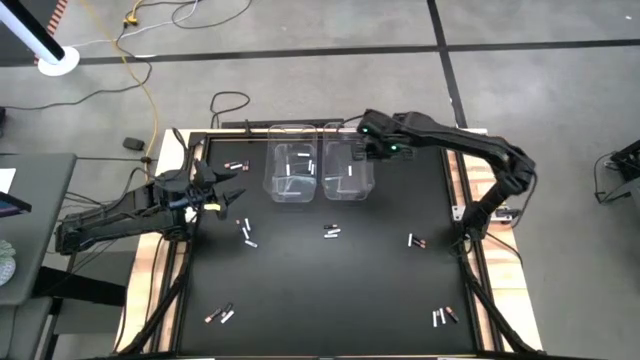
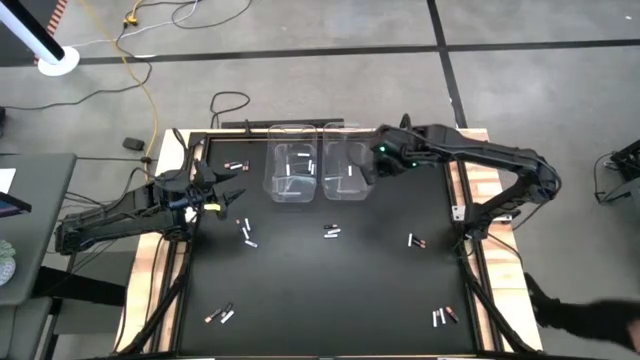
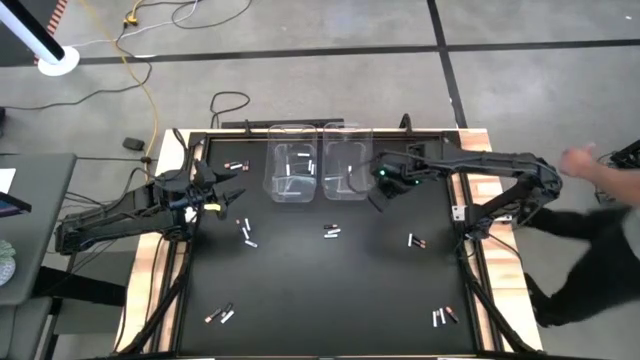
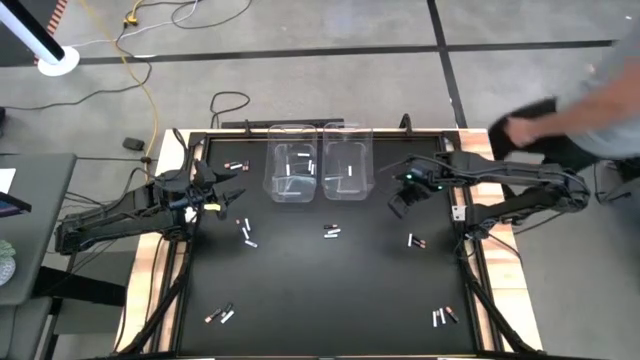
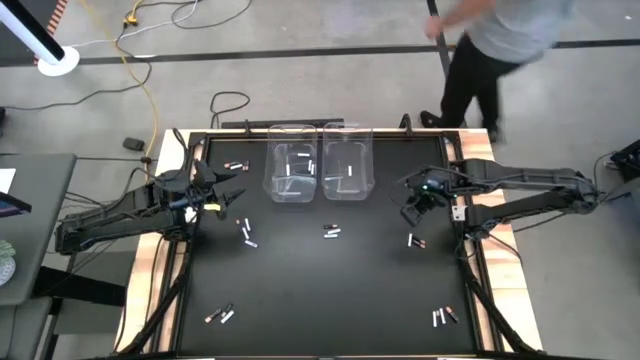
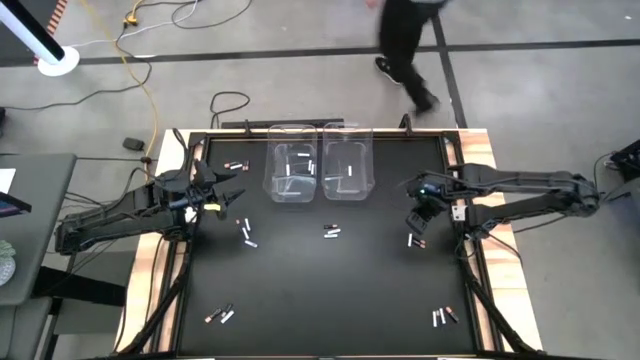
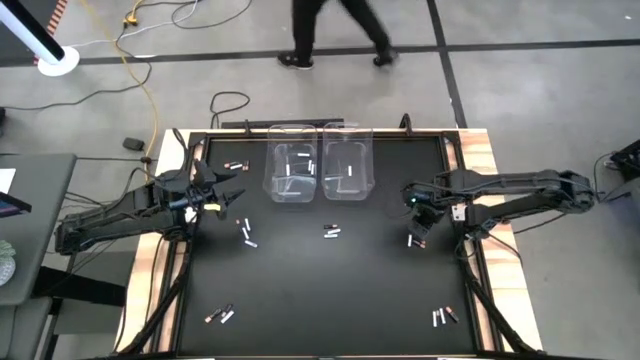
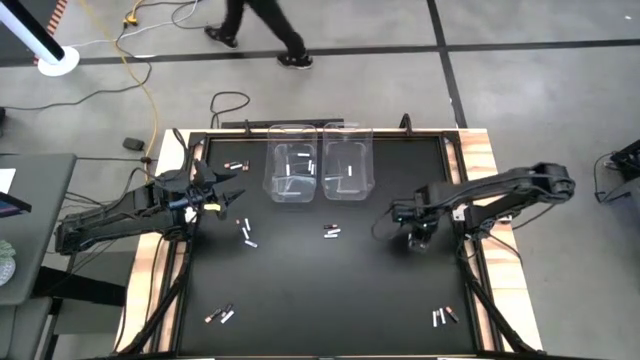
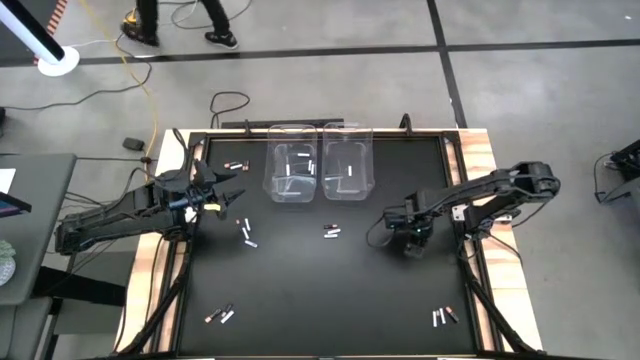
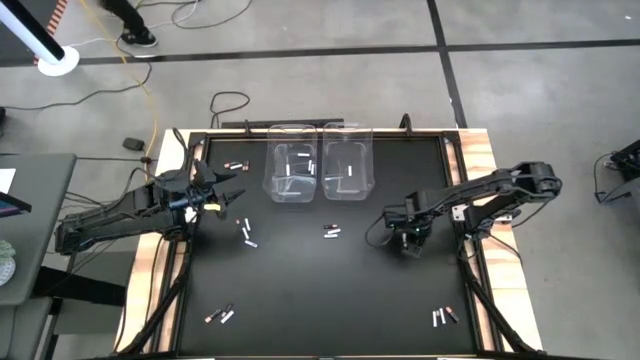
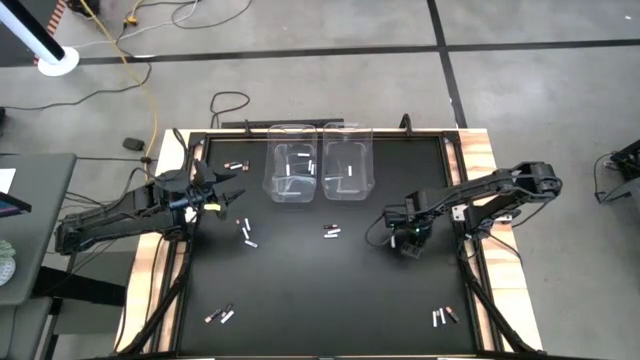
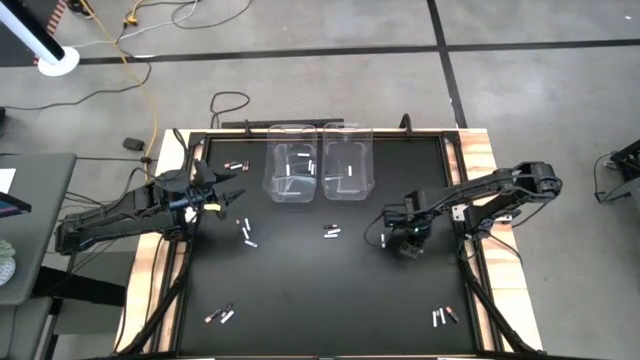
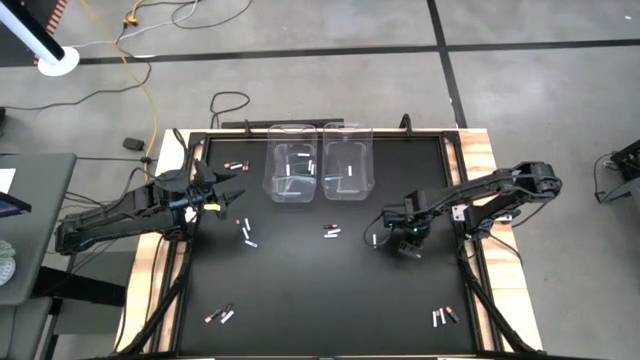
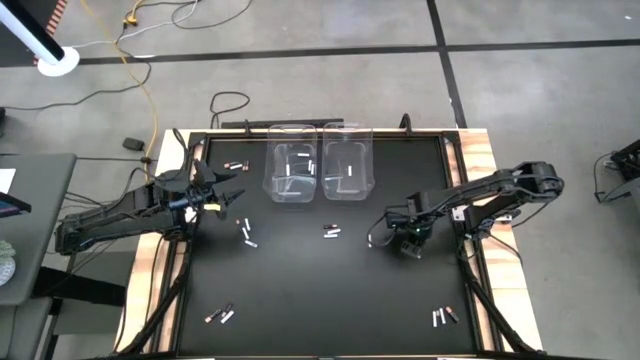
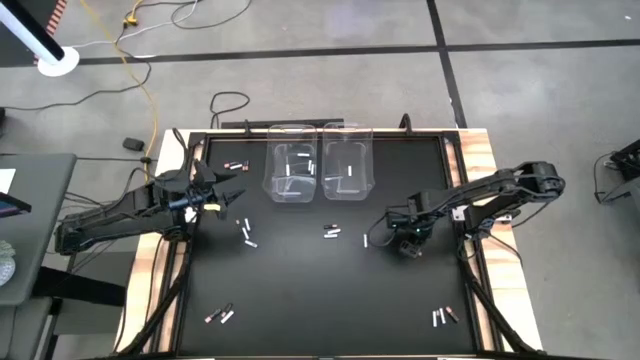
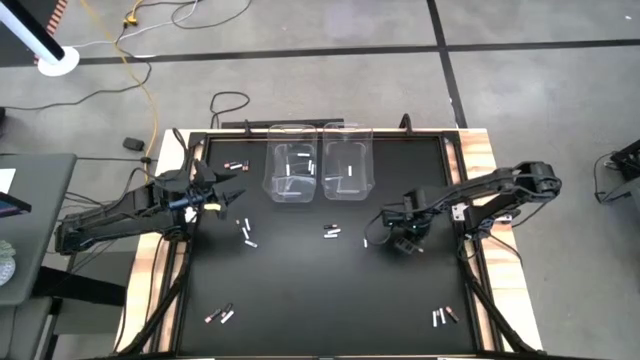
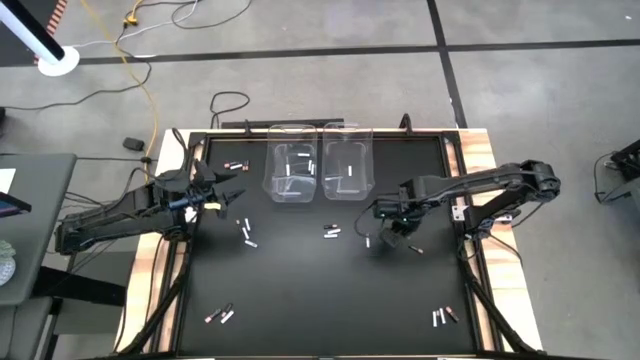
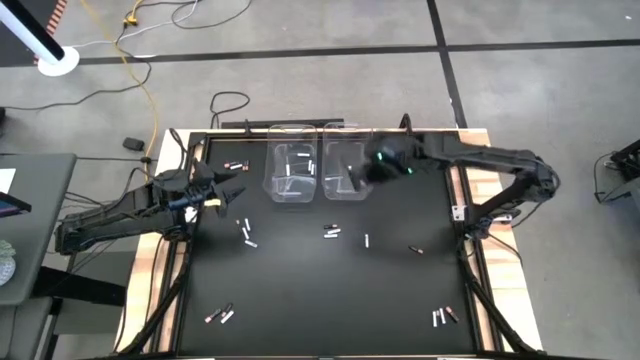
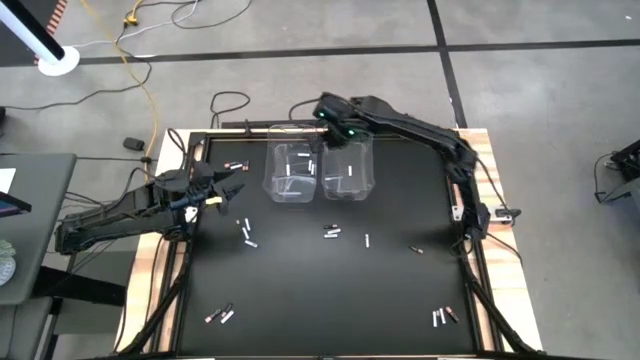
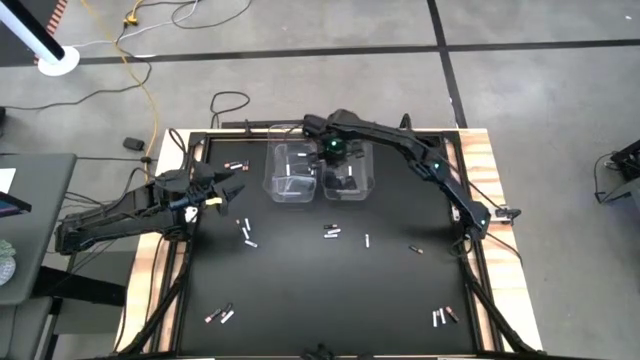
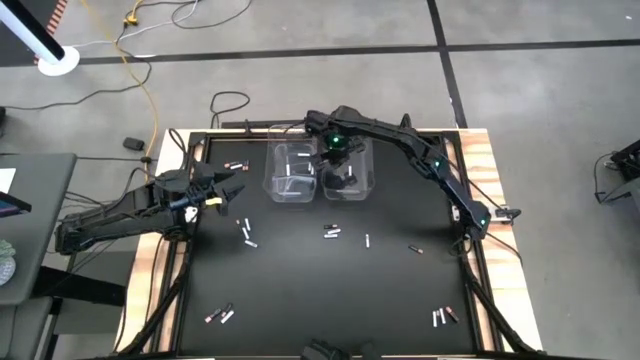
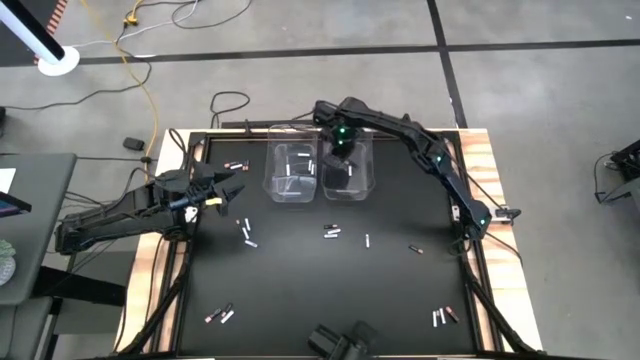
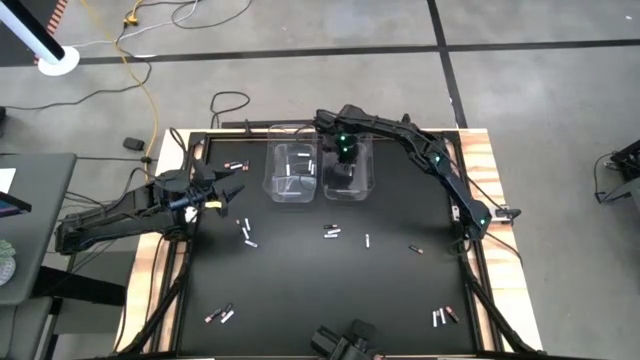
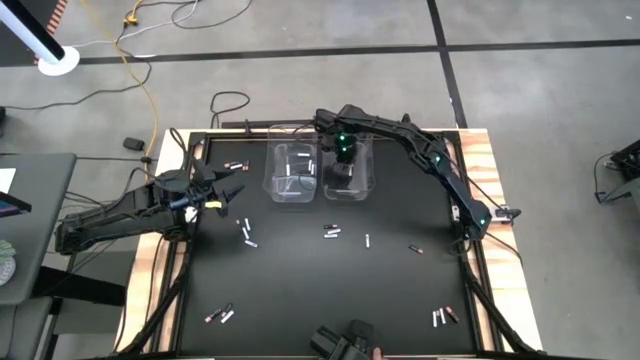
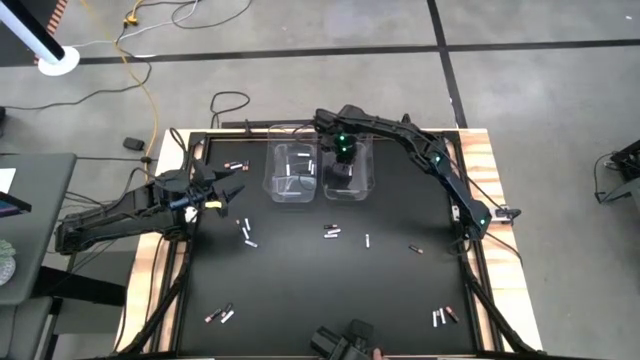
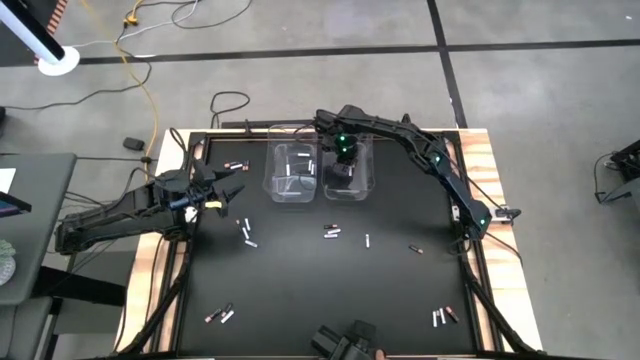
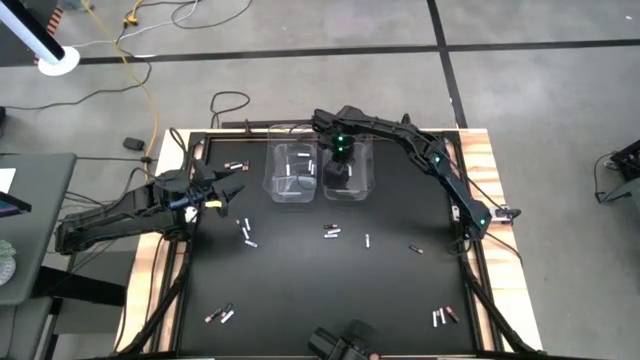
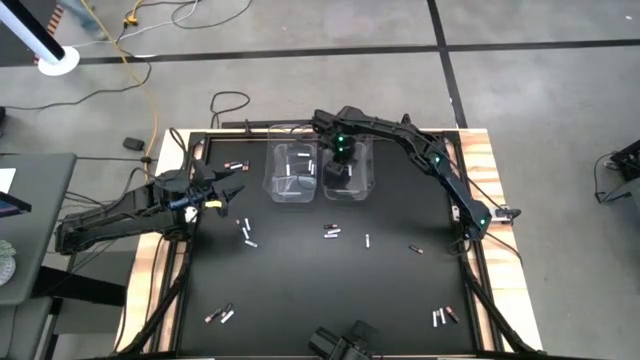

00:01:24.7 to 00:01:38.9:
Task: Sort batteries
Put the black battery into the right transparent bin

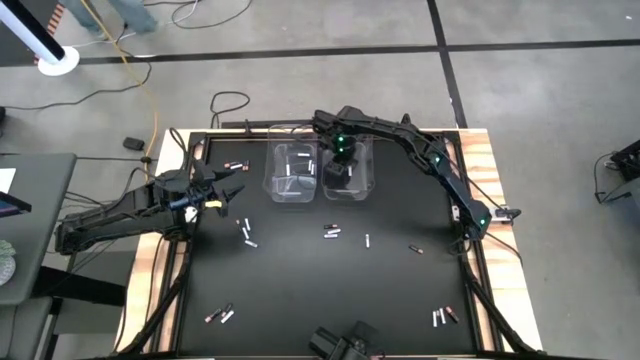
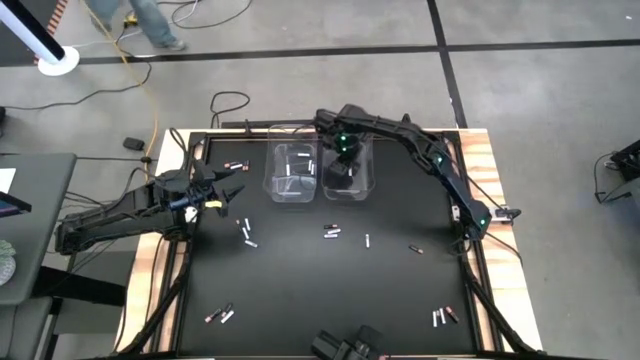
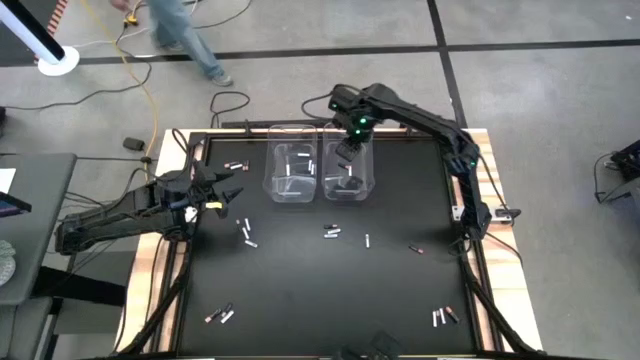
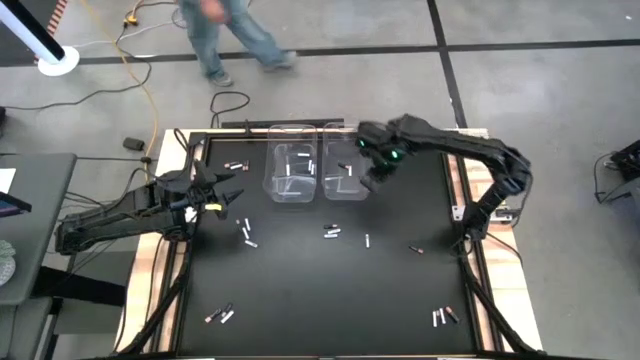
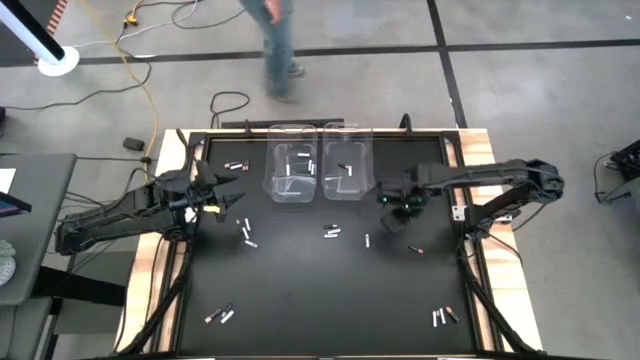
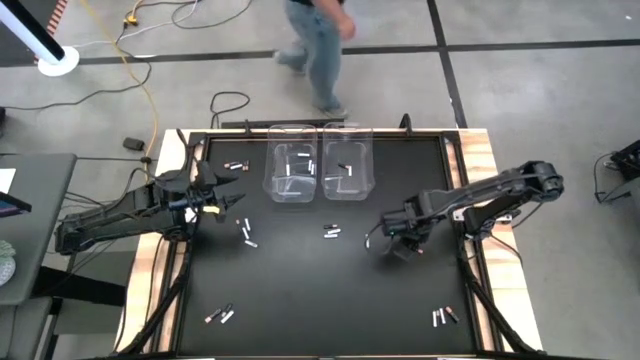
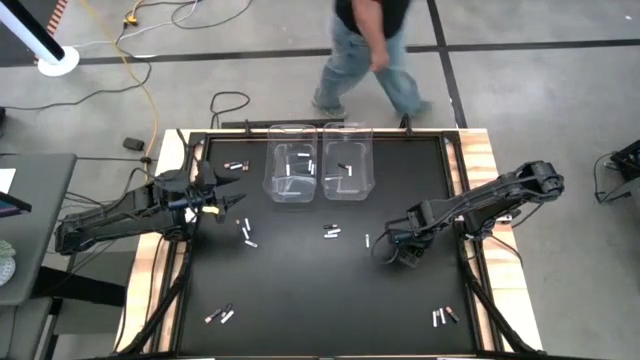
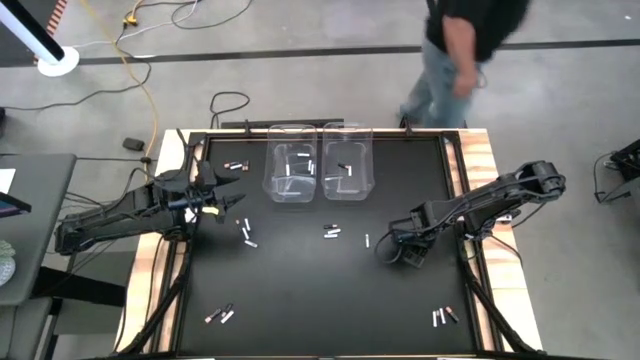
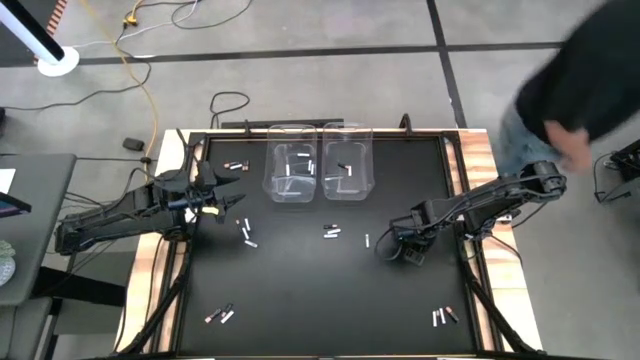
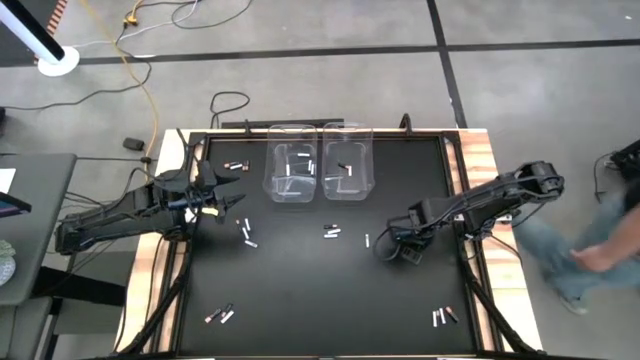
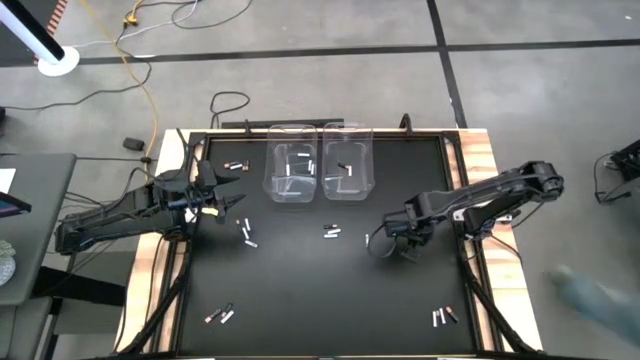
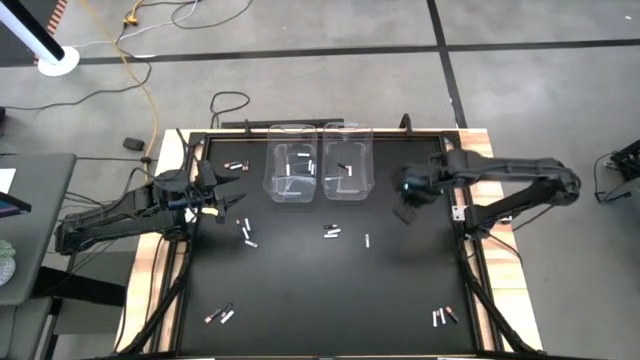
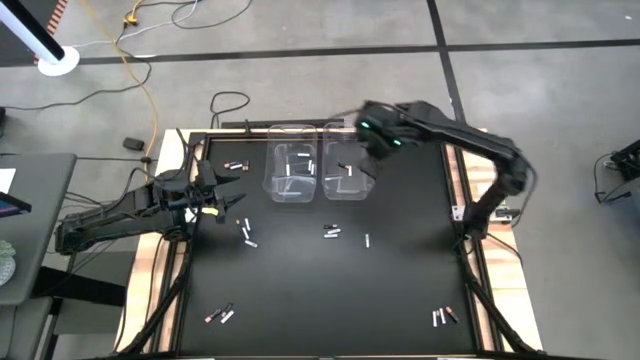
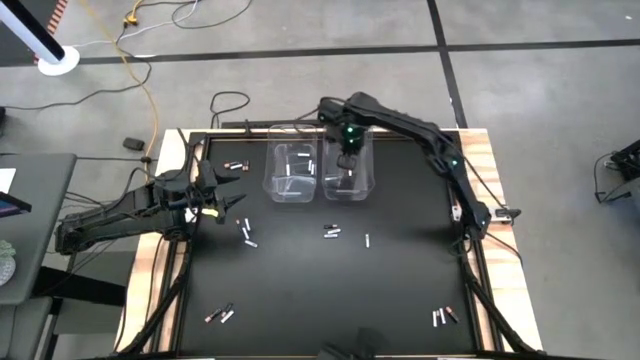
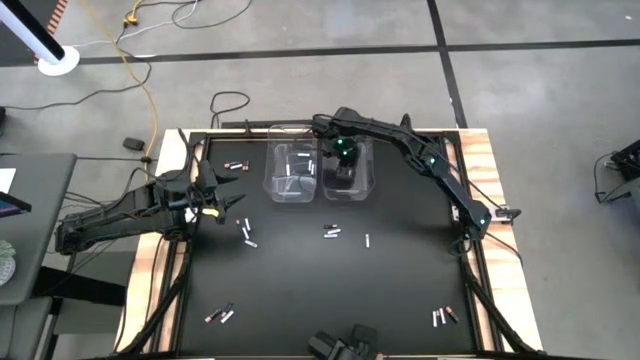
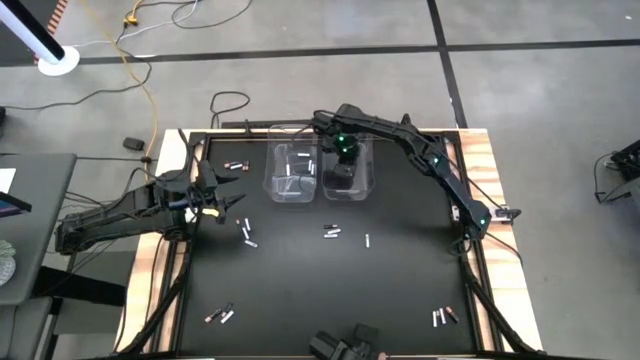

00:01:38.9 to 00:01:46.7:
Put the black battery into the right transparent bin
